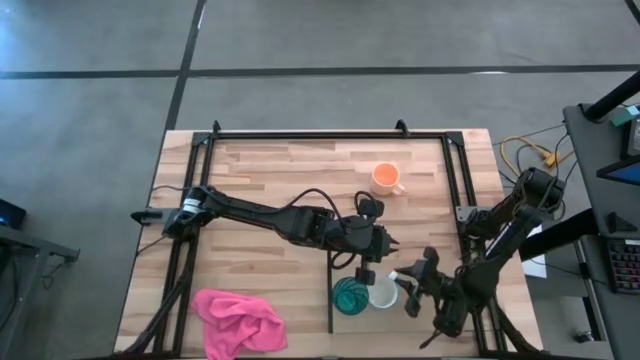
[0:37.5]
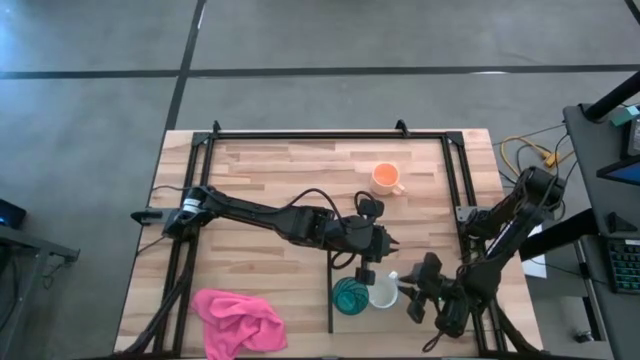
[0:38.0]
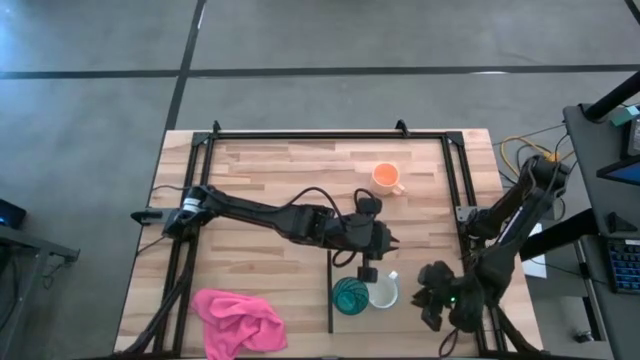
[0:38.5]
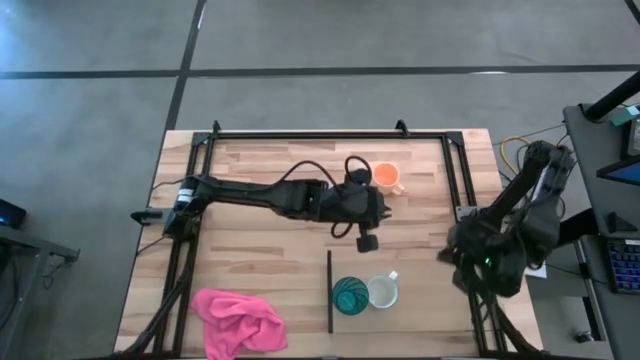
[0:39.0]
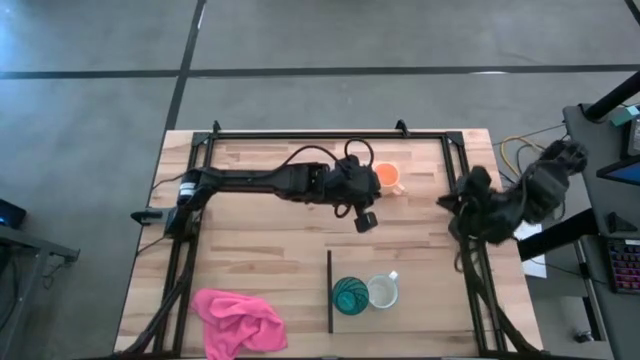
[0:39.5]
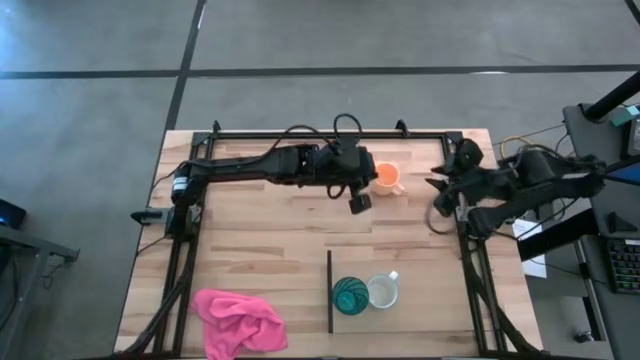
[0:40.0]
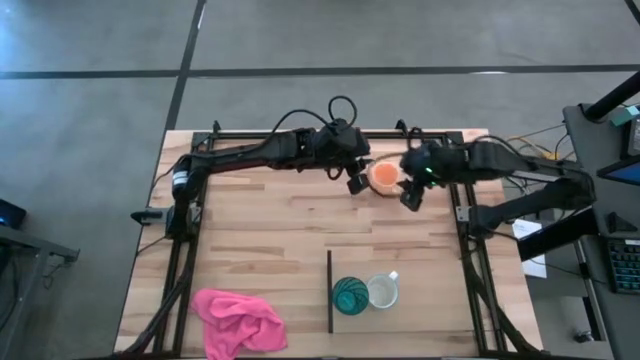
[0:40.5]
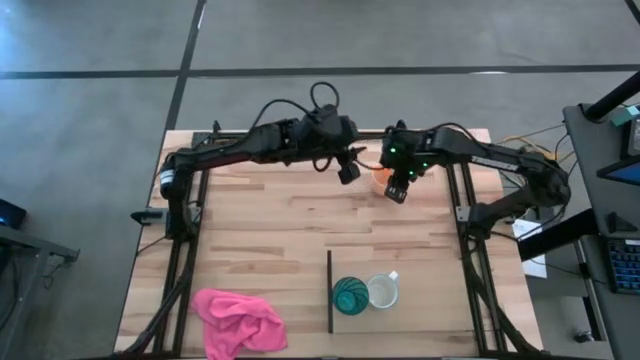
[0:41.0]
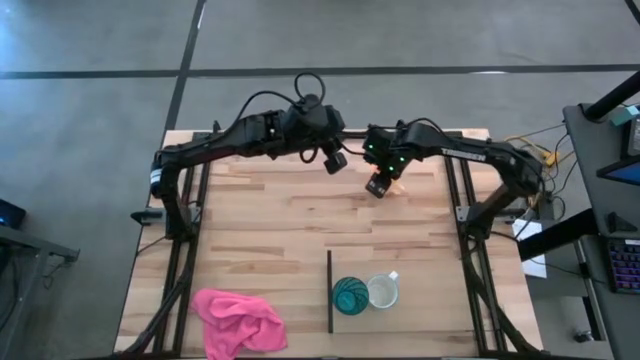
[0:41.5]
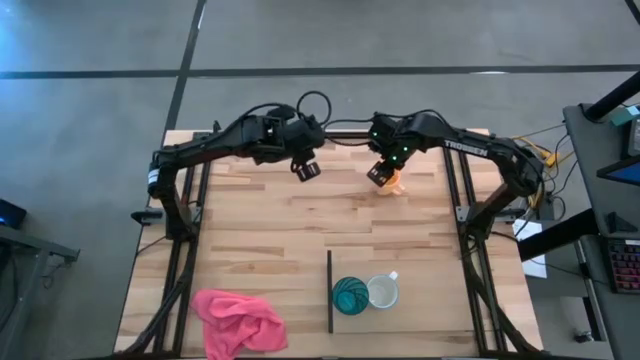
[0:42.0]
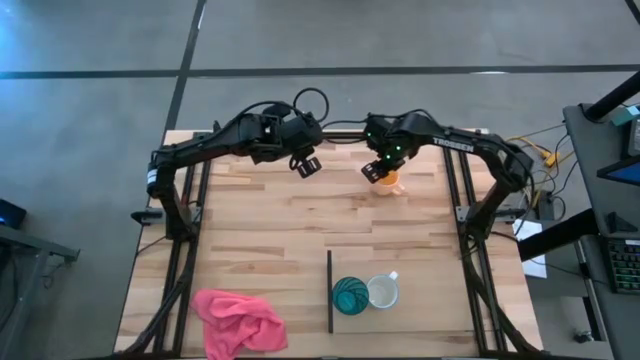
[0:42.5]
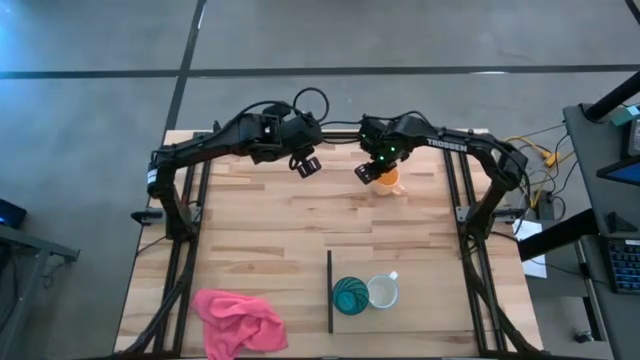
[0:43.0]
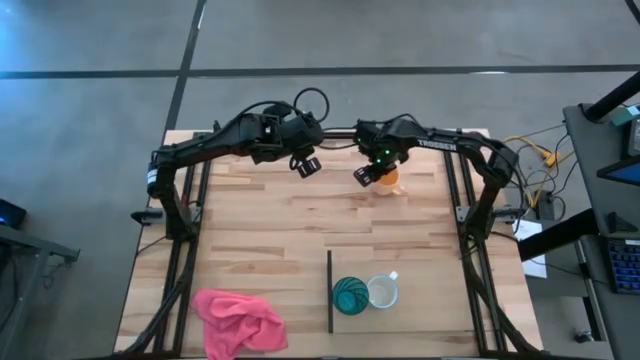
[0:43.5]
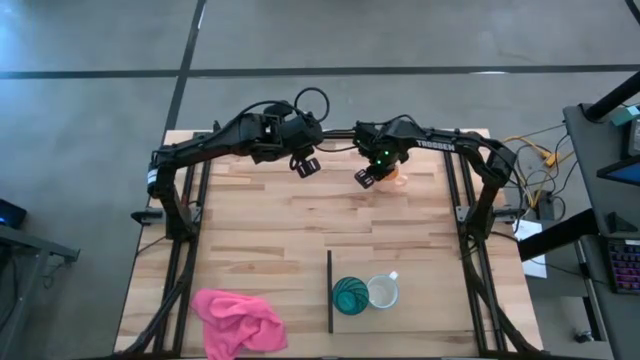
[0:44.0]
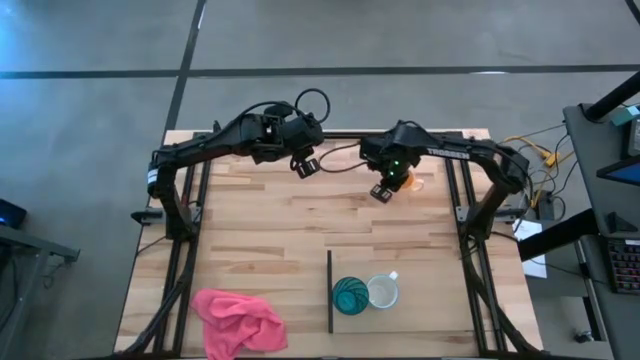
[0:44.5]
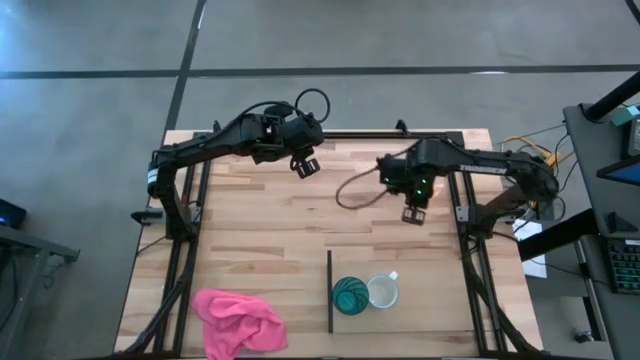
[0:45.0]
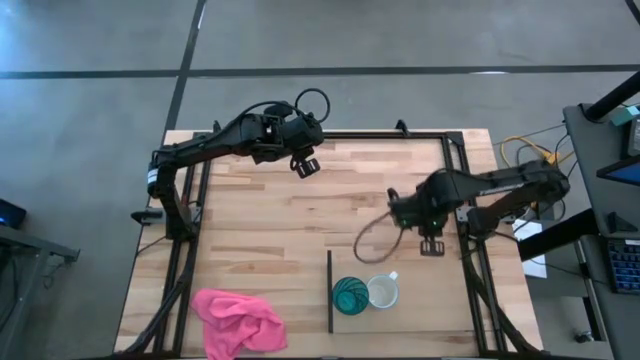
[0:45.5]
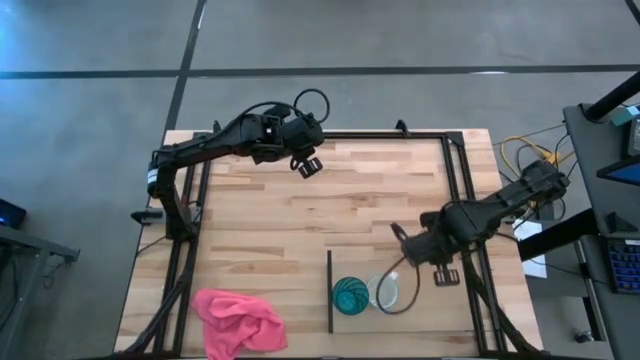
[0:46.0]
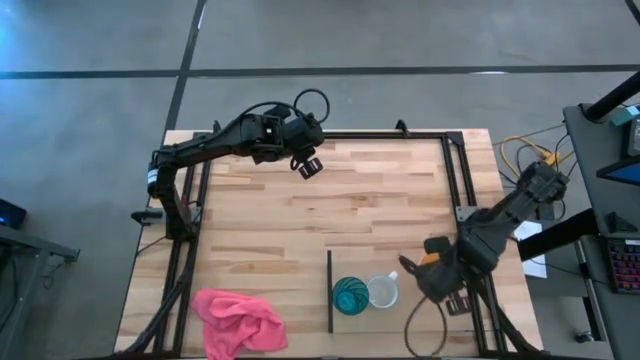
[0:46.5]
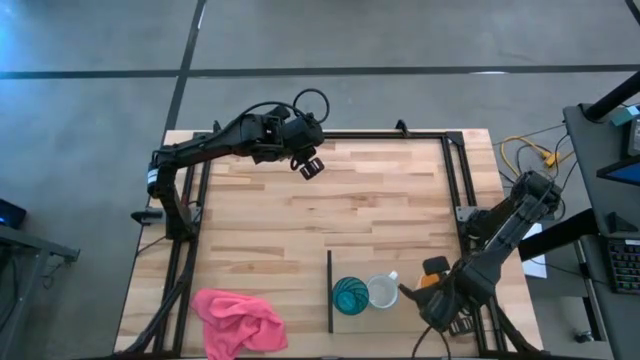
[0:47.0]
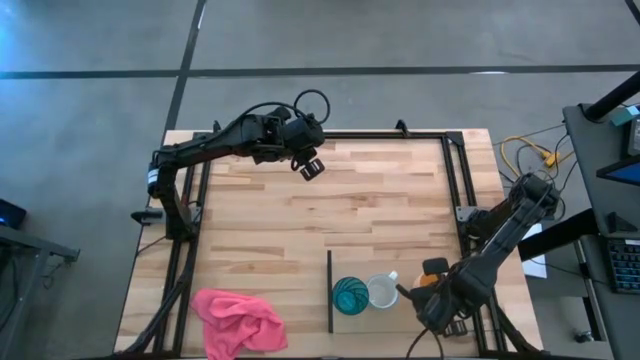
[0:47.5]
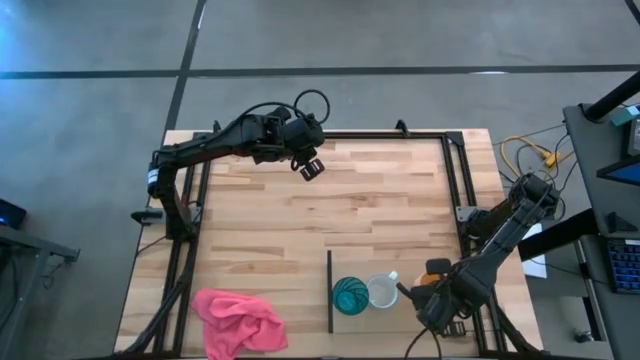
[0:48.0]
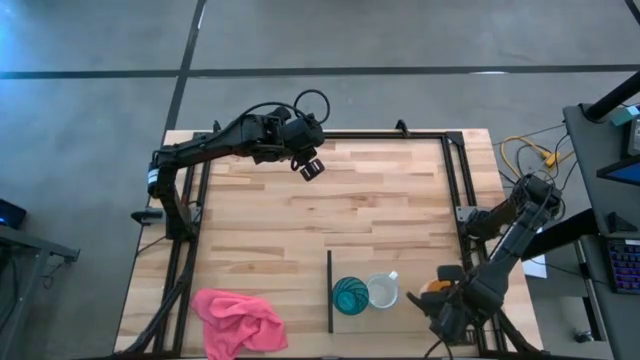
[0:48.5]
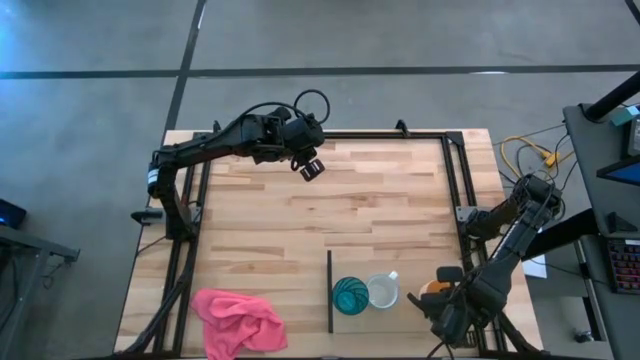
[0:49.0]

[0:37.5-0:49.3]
Task: Stack small to large cups/mugs on shelf
Put the light orange mug on the shelf

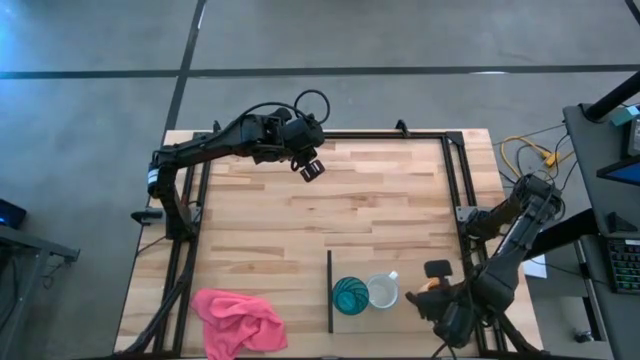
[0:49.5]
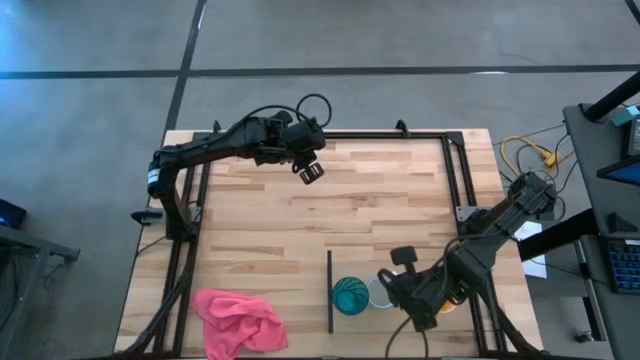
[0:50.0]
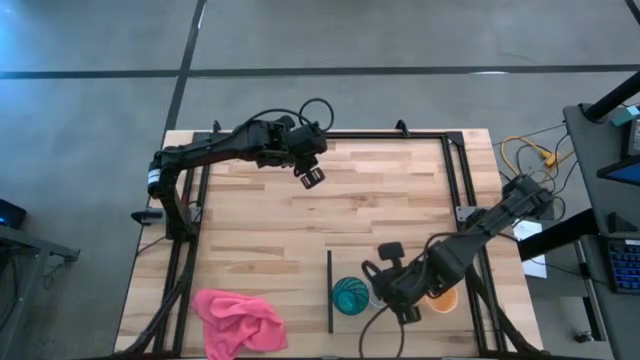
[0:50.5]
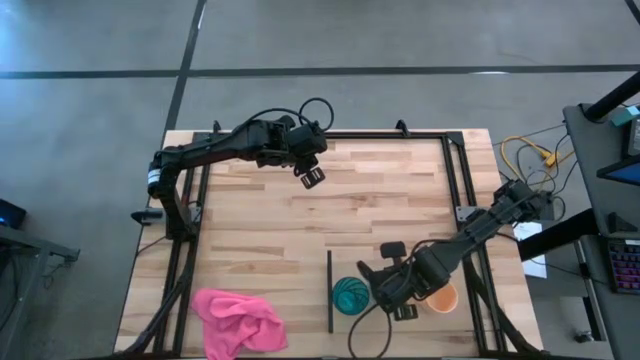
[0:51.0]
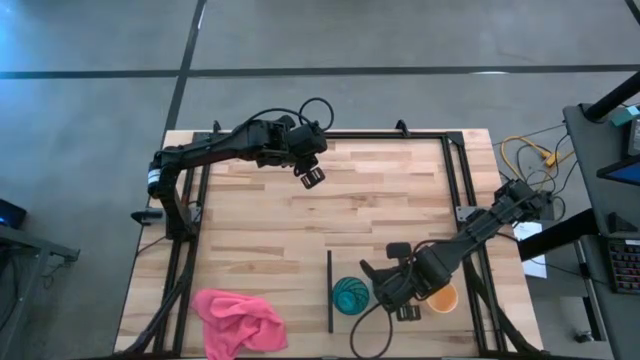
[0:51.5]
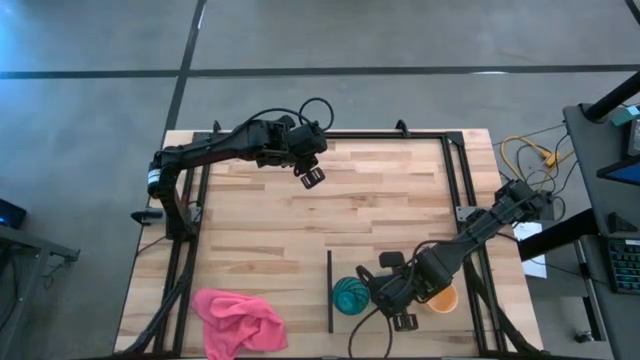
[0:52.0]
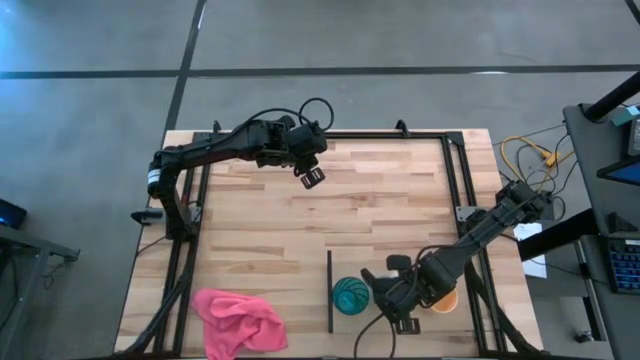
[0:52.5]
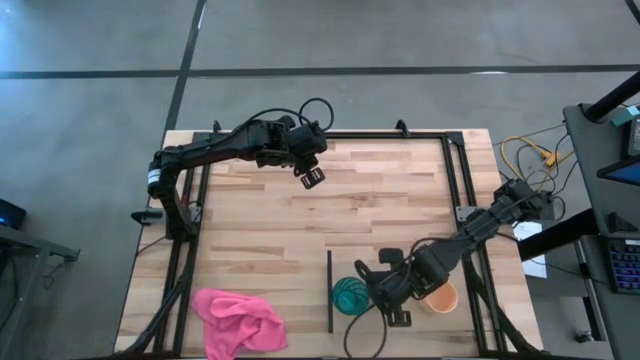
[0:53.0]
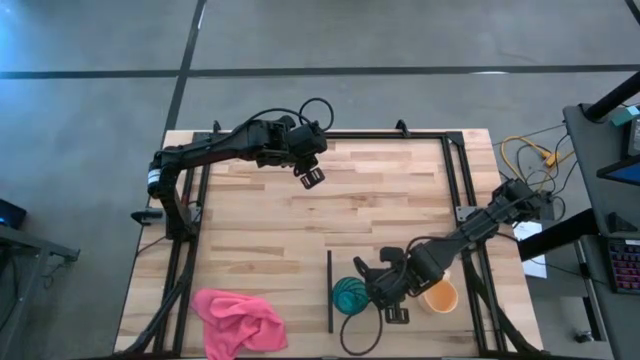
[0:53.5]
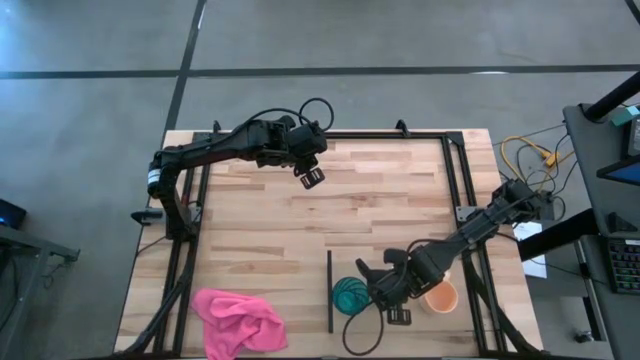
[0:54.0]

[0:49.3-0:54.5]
Adjust the green patterned mug

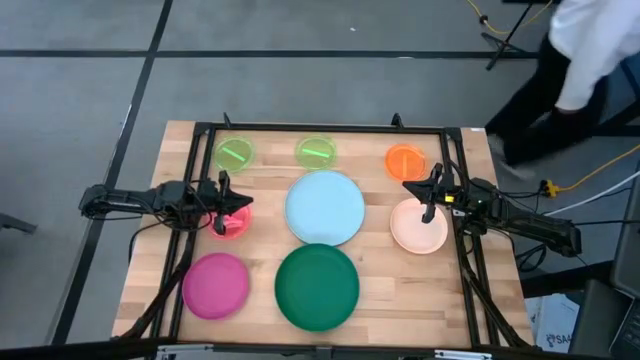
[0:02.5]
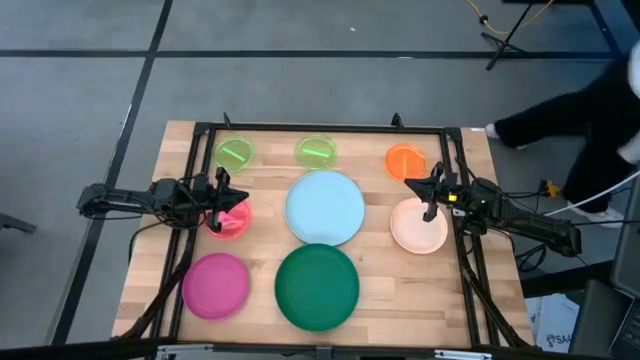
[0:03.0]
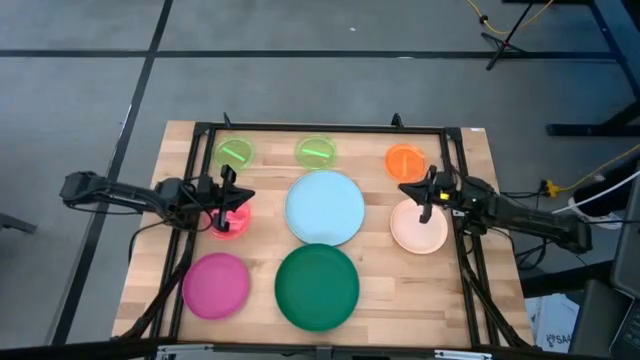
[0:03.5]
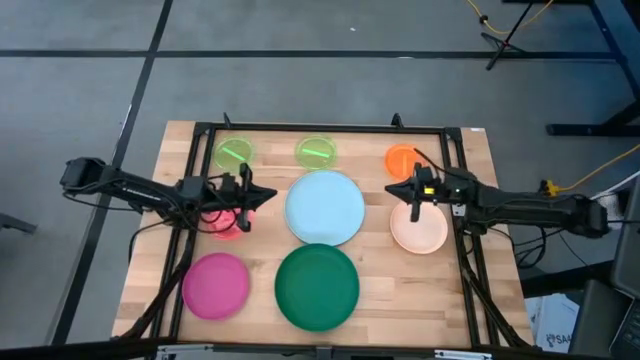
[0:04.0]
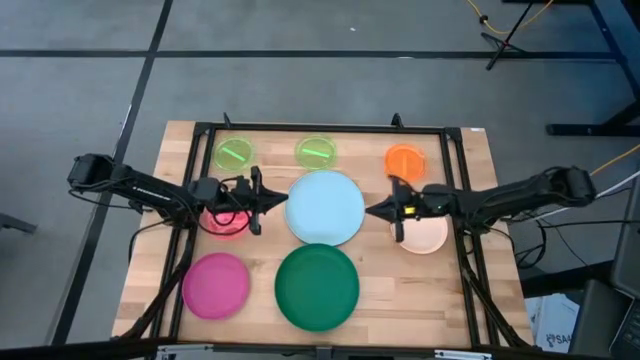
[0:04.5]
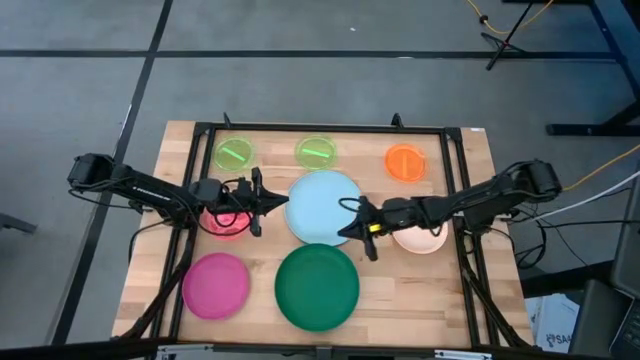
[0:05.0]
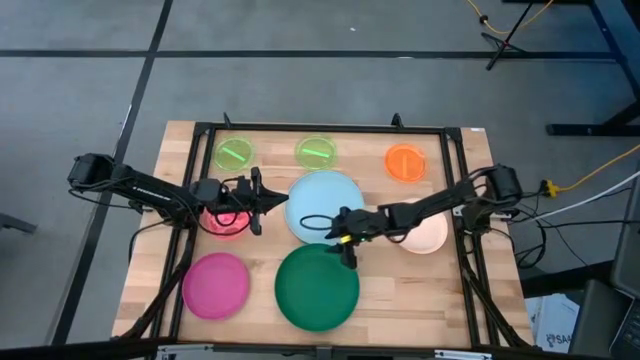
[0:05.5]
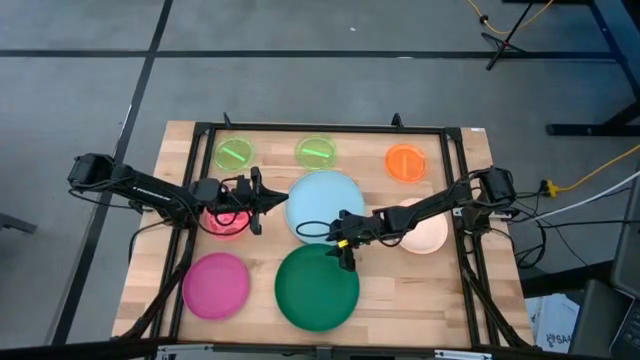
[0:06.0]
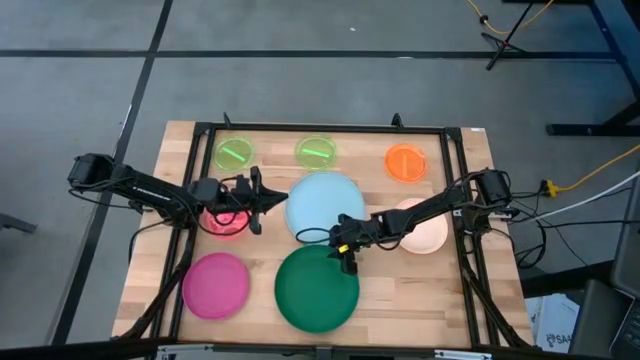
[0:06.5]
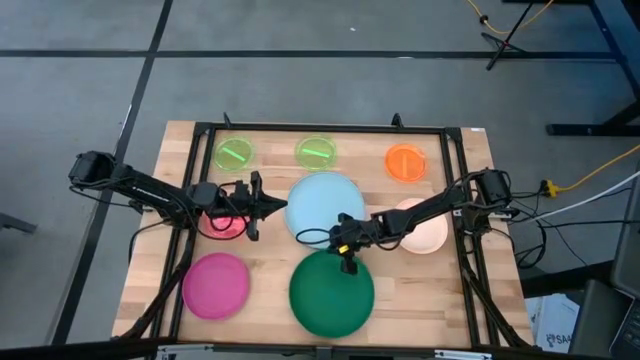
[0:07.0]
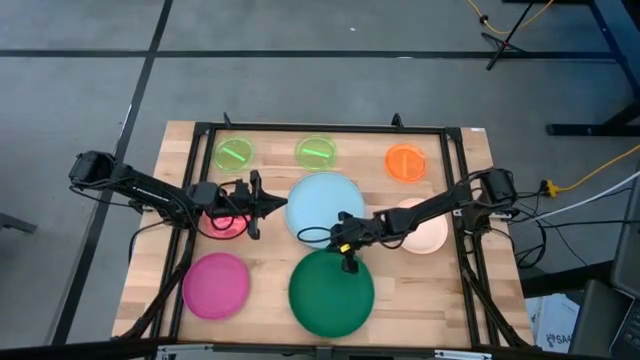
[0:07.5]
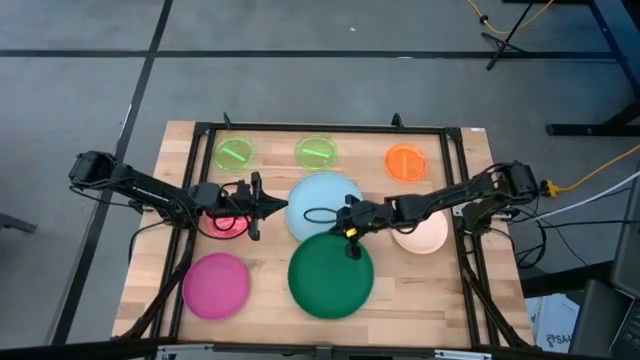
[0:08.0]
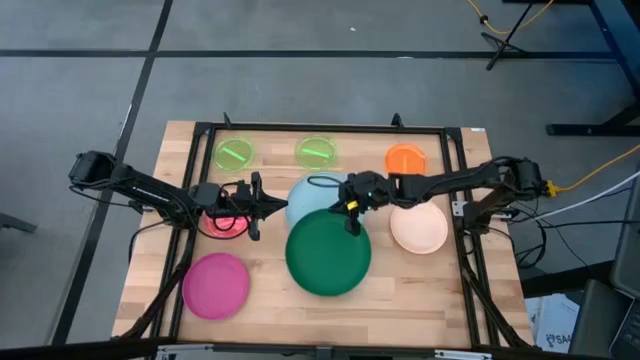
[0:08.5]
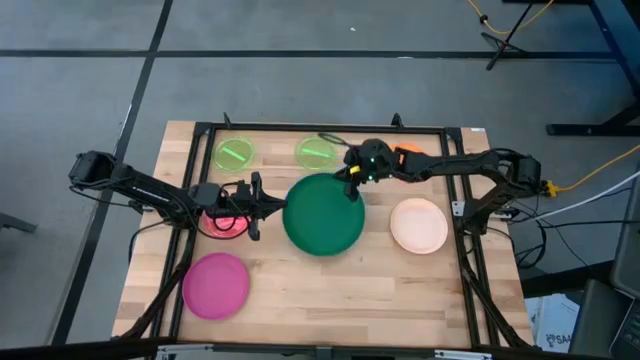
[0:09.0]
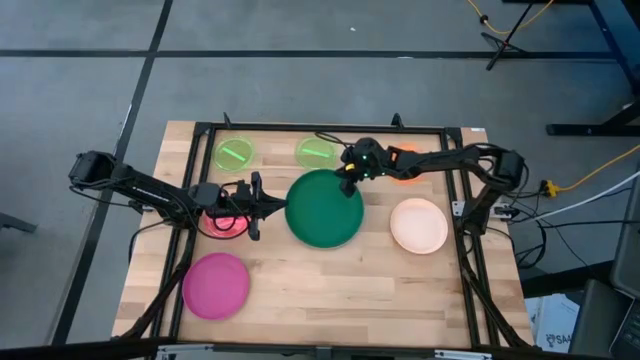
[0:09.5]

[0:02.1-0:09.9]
Task: Stack plastic plates
Stack the dark green plate on top of the blue plate
